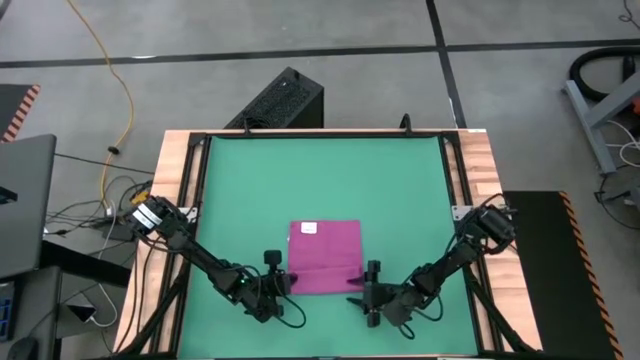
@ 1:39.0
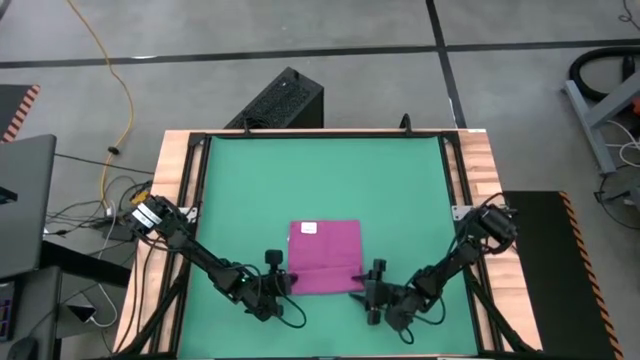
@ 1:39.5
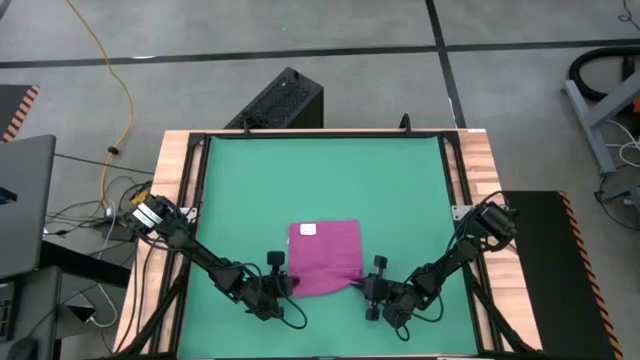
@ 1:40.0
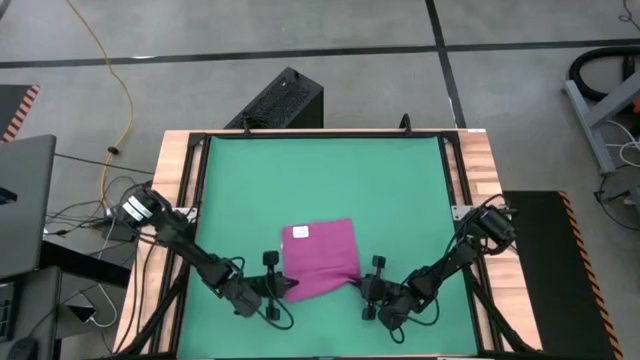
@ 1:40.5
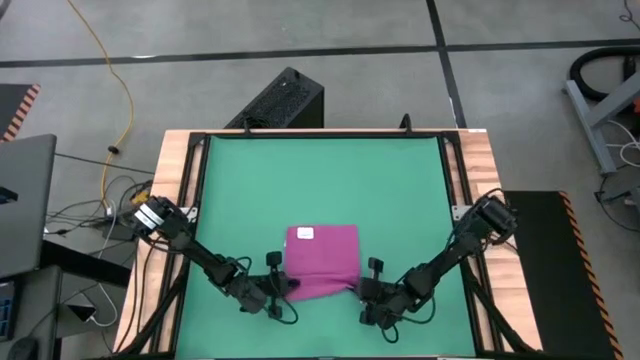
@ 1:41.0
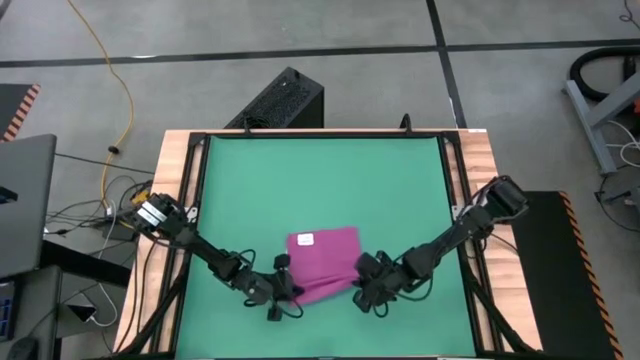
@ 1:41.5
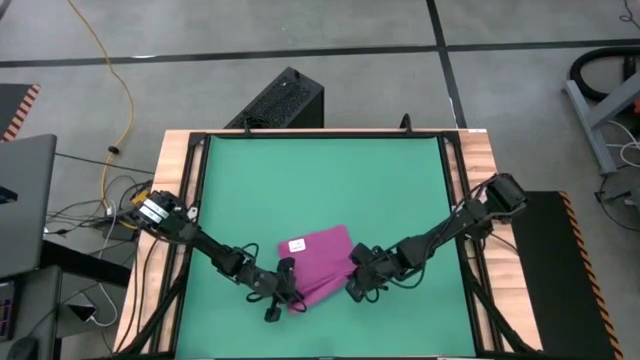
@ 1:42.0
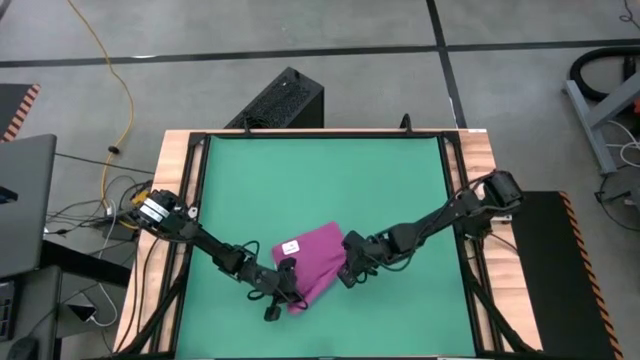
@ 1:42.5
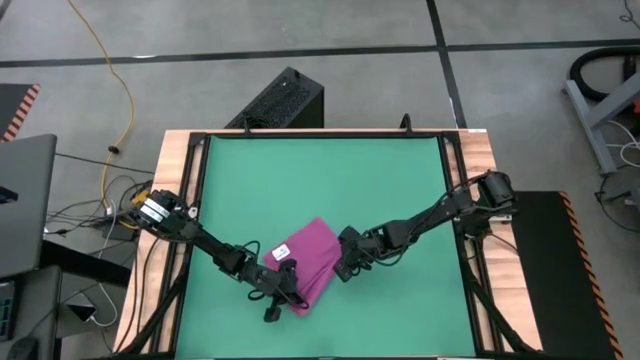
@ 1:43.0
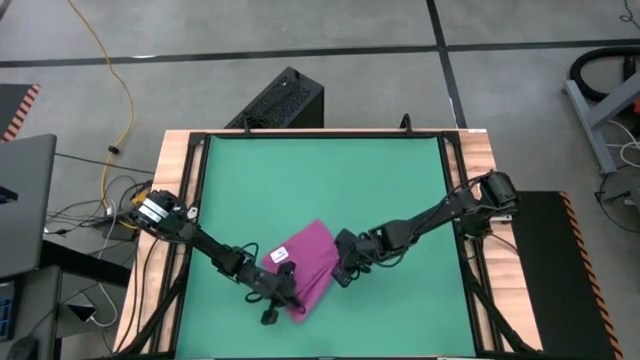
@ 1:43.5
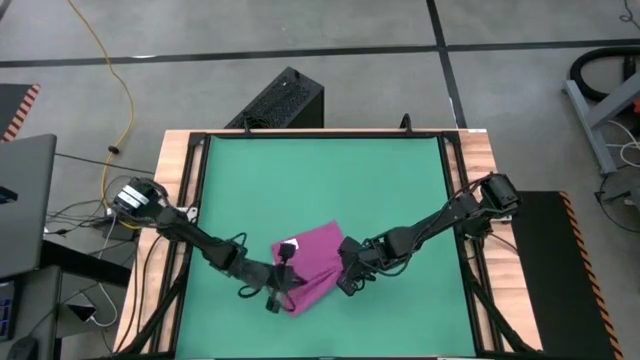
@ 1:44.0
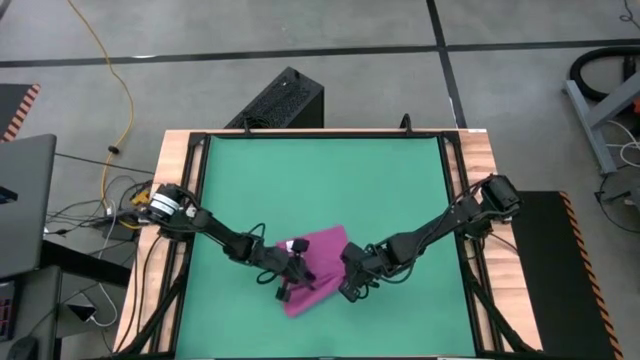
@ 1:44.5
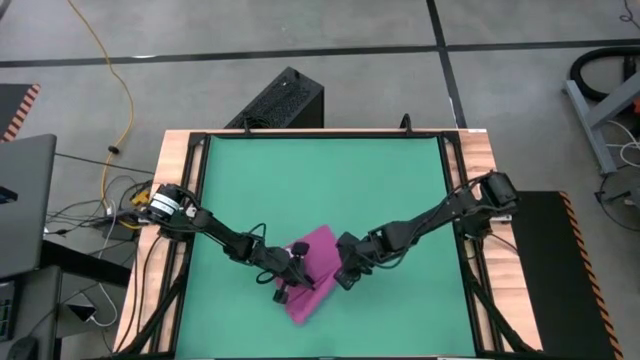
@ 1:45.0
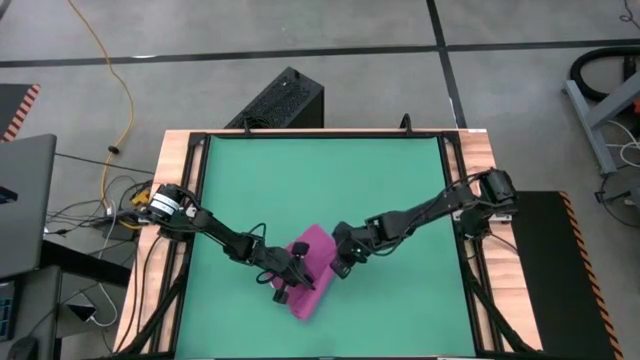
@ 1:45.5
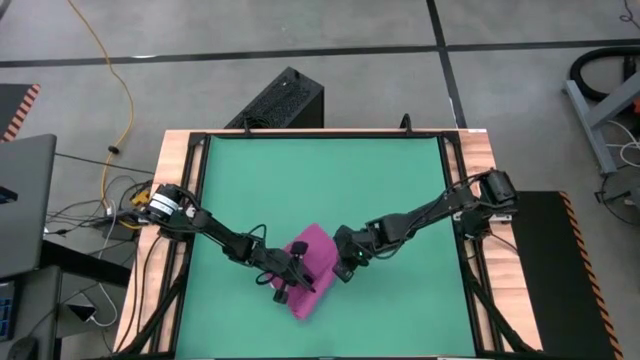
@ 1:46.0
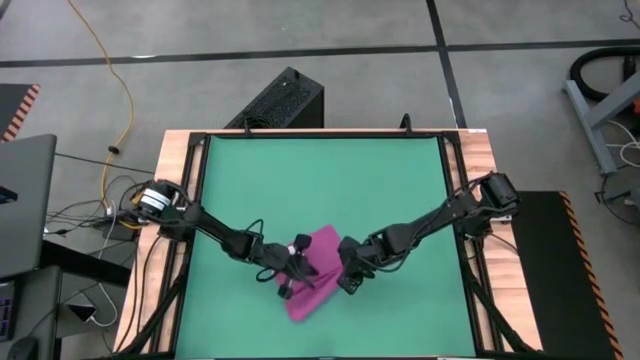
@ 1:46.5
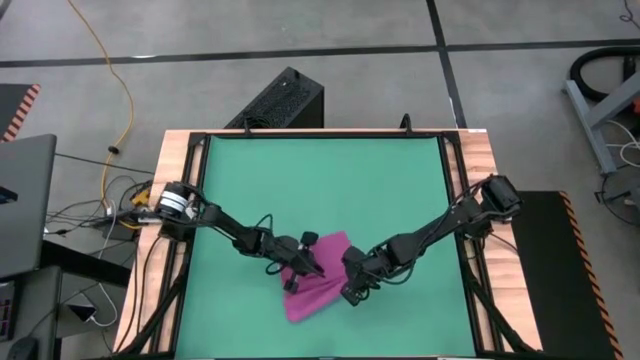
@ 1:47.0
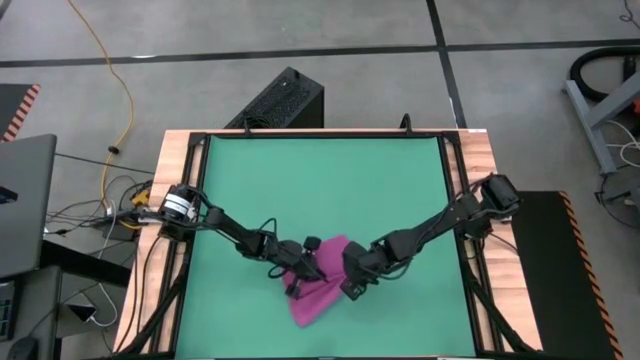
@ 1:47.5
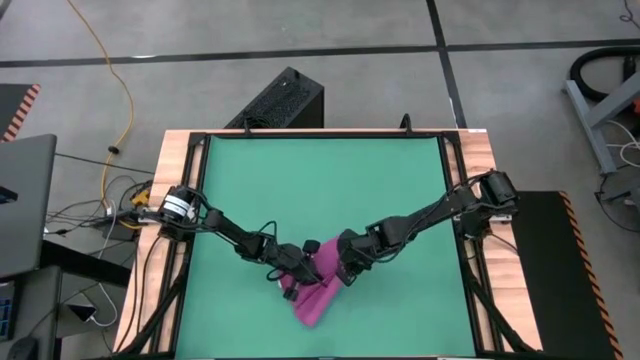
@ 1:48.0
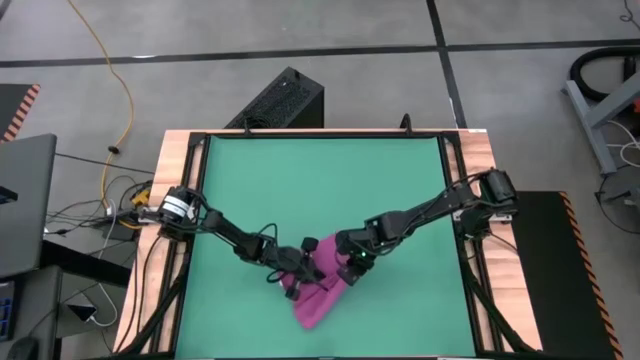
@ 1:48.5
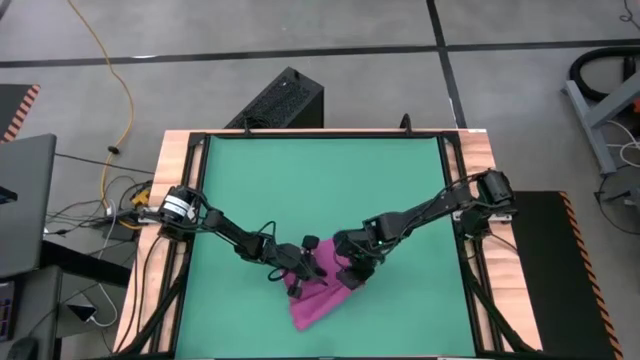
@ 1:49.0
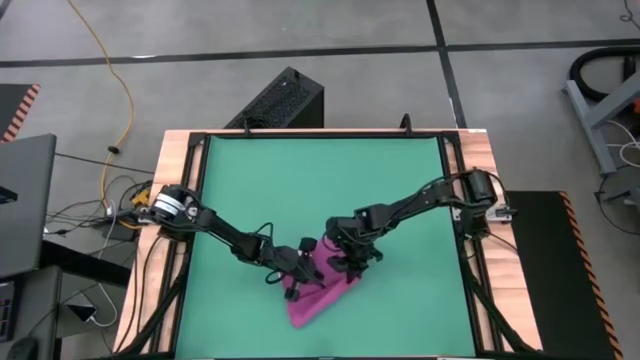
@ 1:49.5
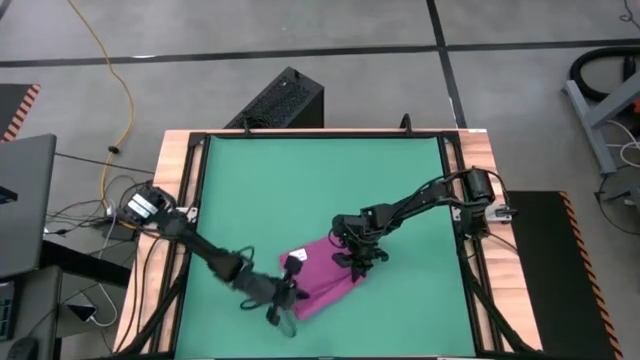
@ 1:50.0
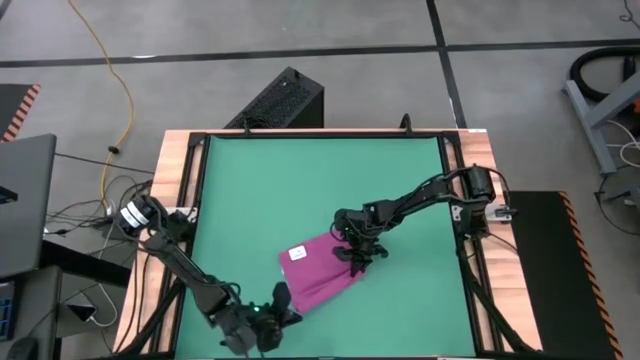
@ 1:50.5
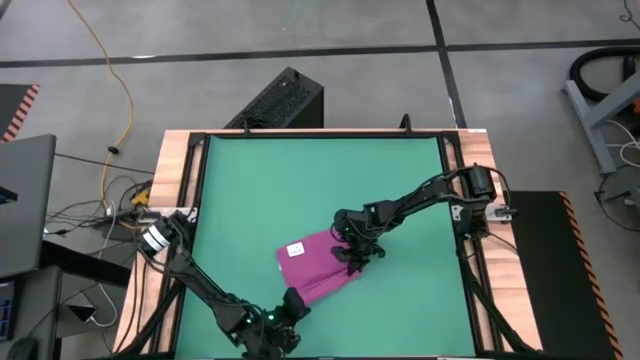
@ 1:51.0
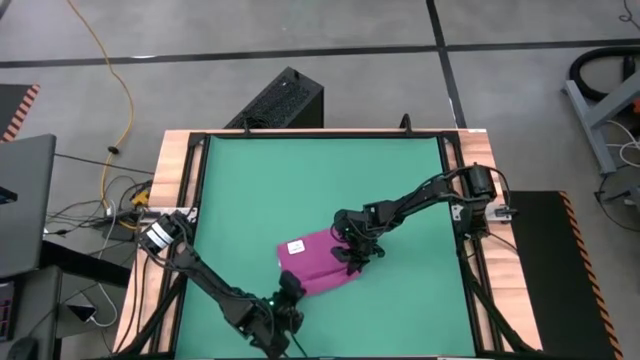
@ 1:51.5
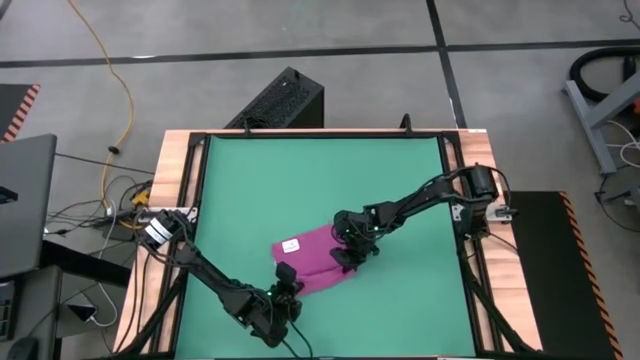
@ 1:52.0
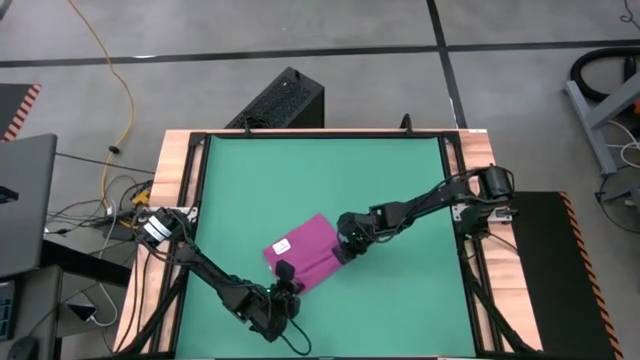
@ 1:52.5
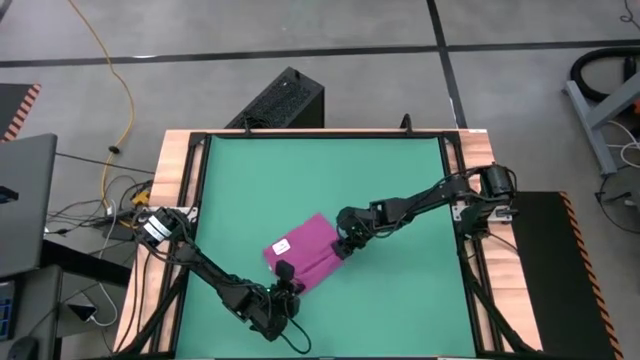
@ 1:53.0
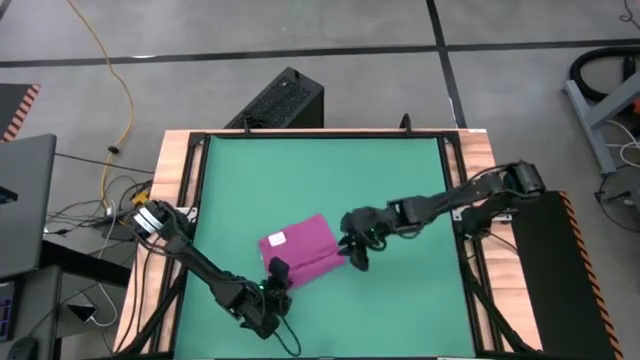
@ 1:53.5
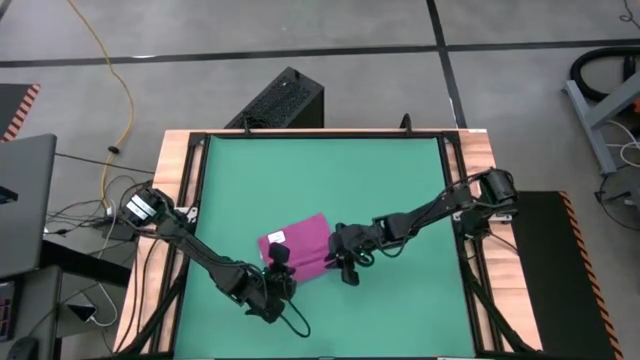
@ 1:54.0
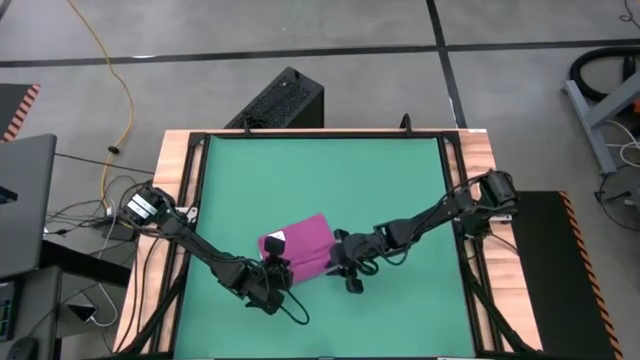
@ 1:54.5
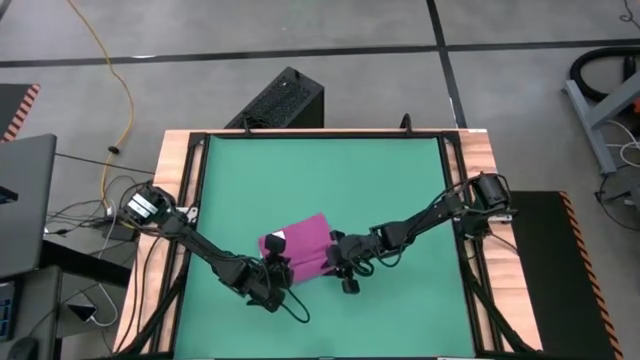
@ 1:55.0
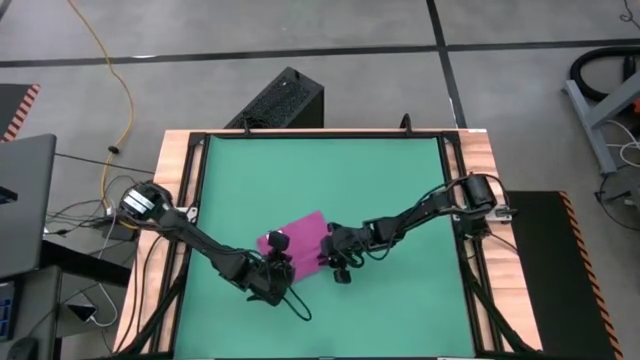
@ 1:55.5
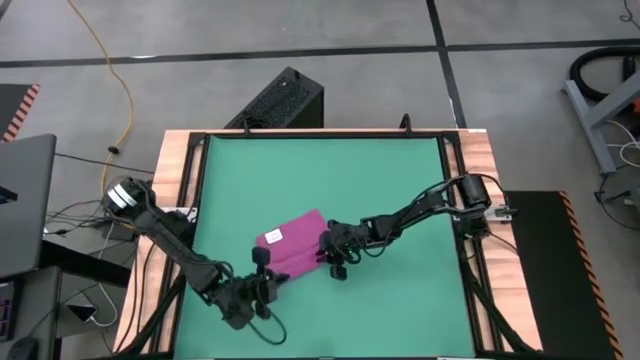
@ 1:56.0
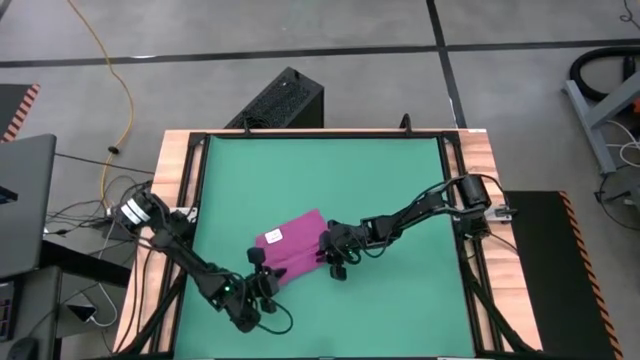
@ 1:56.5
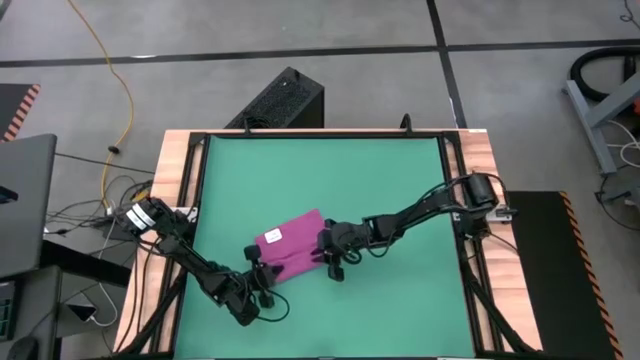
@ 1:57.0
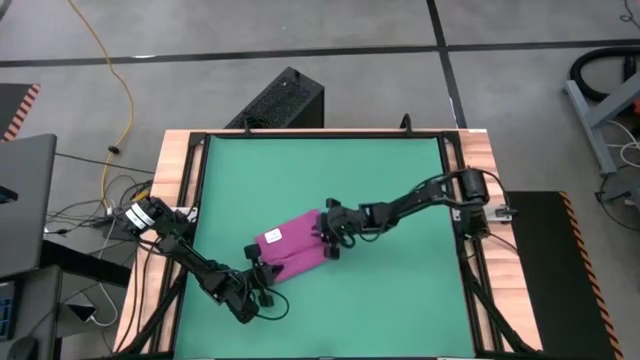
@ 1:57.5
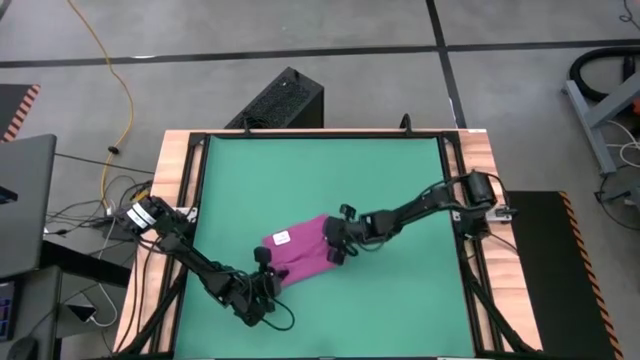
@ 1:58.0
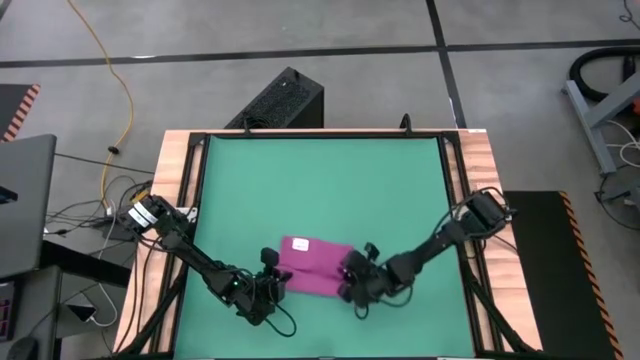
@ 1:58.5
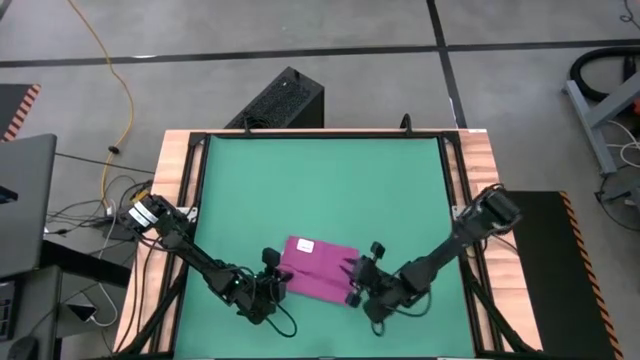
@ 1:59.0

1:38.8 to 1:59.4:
Task: Roll towel
Roll the pink towel
